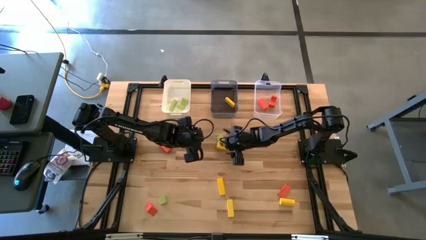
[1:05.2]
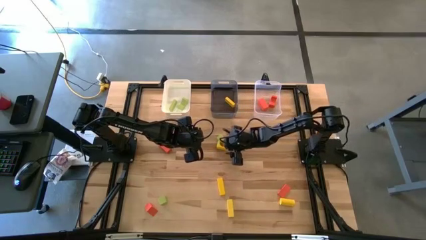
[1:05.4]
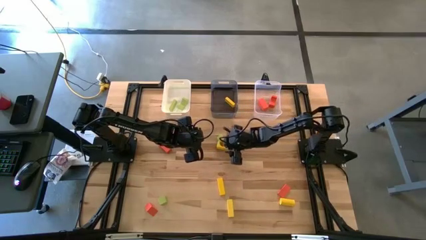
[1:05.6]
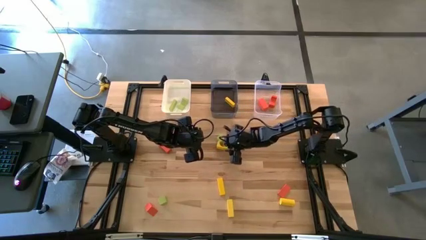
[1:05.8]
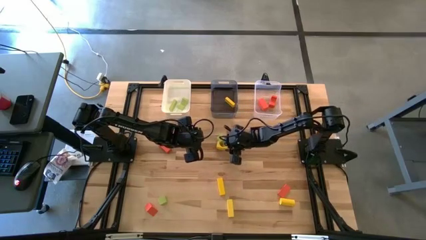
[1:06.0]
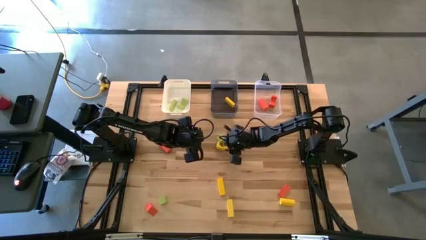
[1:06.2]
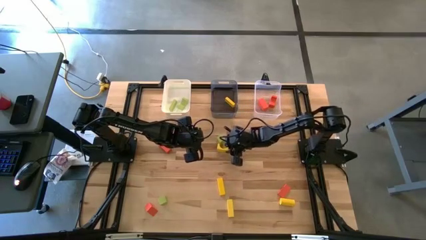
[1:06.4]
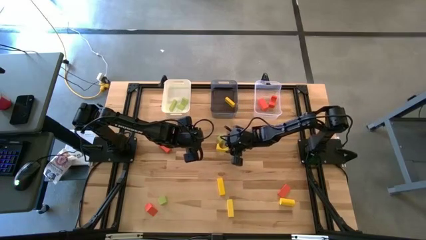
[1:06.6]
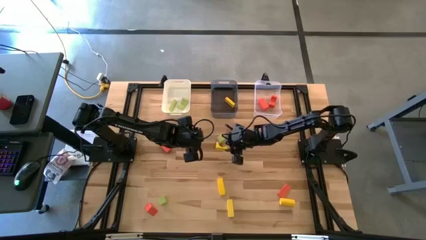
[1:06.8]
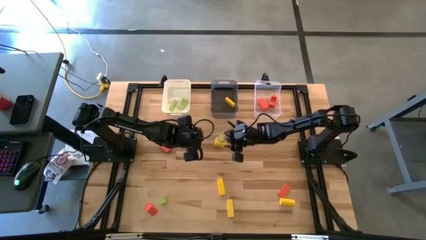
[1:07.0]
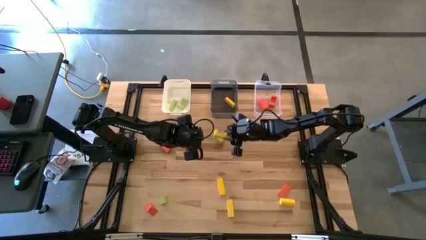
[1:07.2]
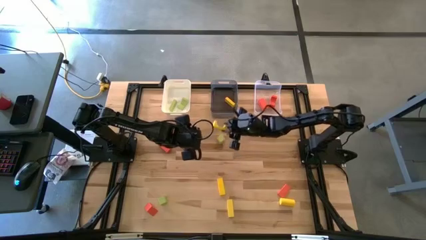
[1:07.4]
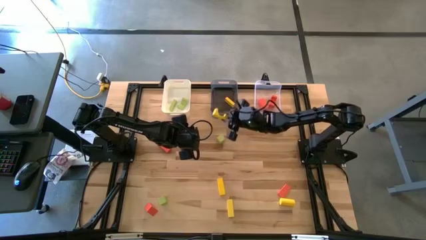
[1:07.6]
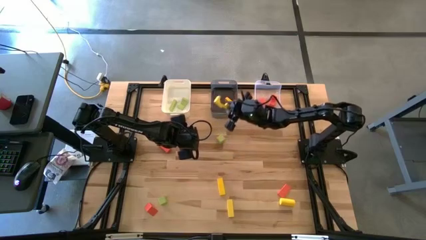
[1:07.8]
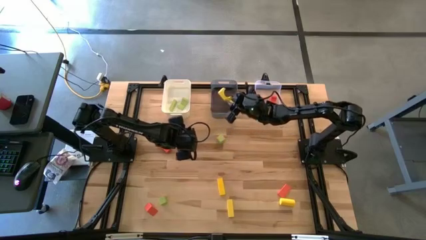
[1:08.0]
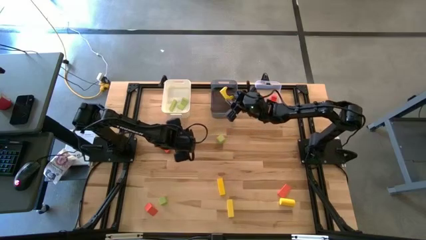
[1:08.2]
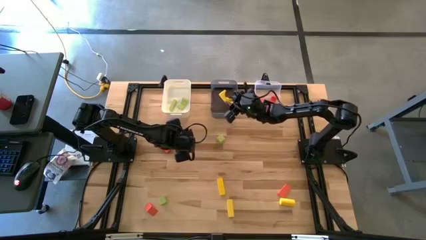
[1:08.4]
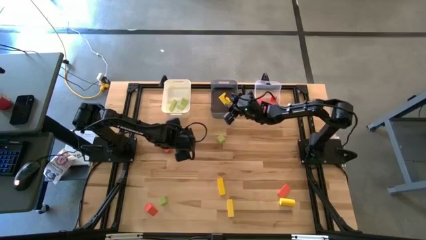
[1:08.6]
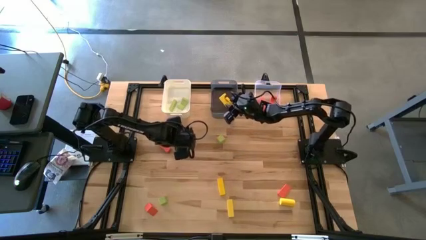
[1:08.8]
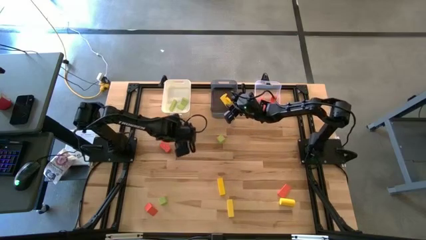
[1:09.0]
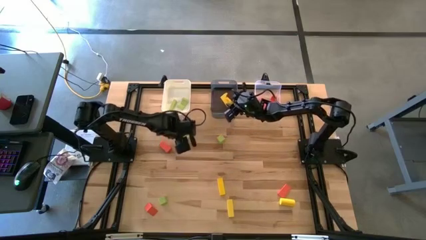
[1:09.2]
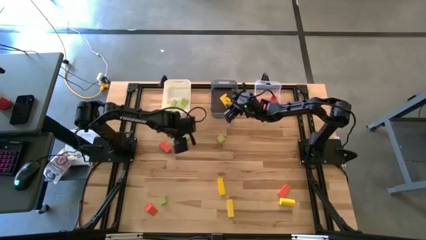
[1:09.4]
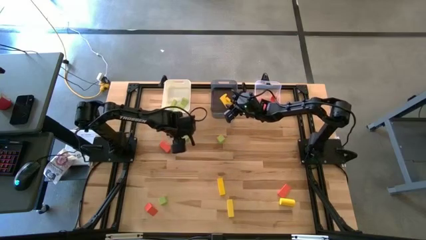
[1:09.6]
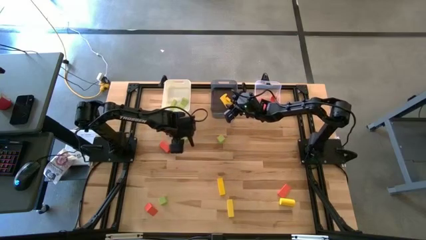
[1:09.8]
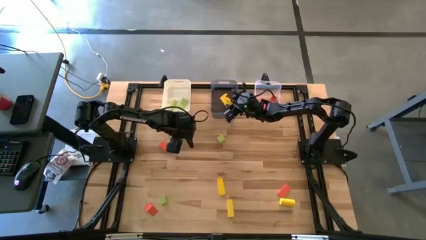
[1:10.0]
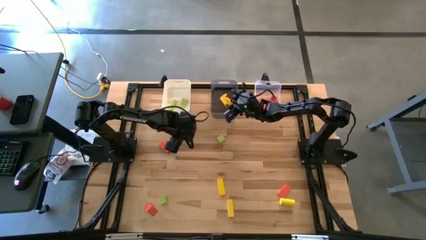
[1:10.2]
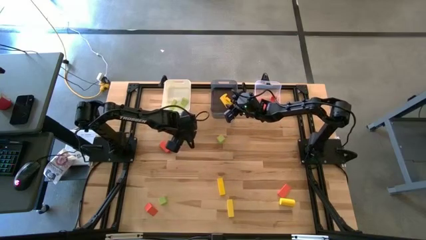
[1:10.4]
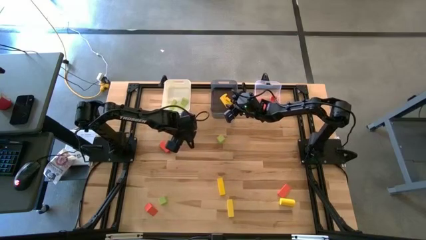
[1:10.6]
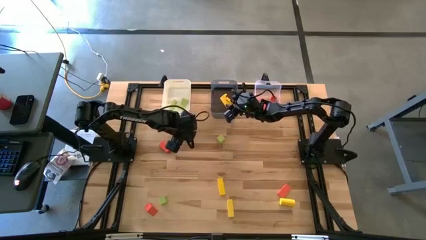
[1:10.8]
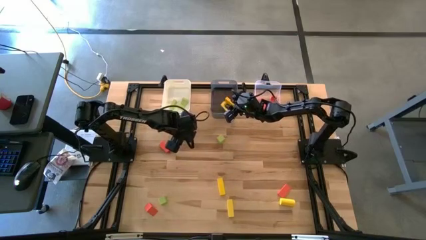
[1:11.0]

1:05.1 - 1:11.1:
Task: Sort & place blocks by color
Put the yellow block into the black bin

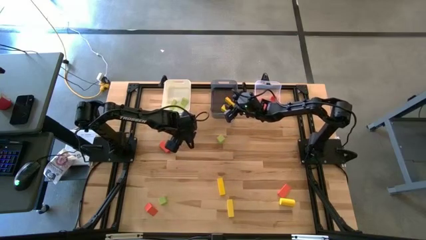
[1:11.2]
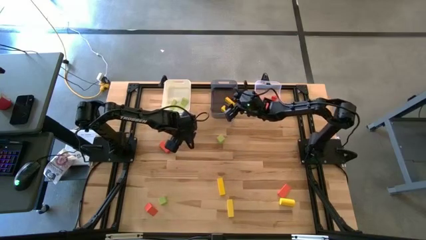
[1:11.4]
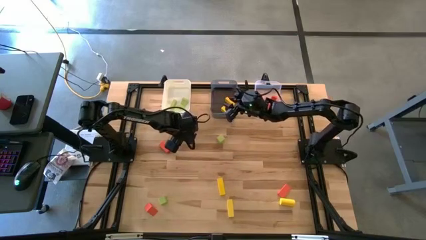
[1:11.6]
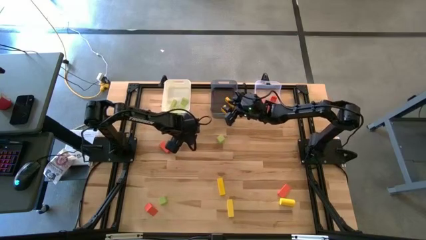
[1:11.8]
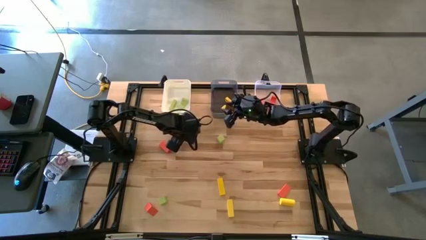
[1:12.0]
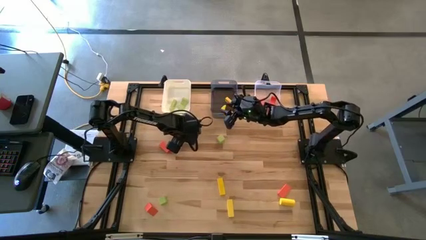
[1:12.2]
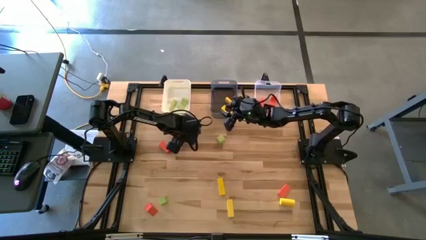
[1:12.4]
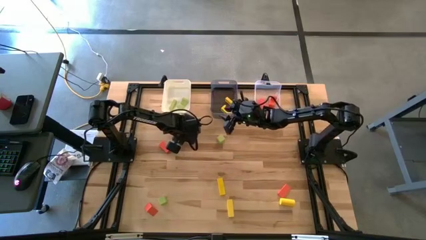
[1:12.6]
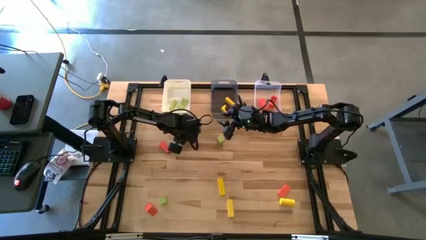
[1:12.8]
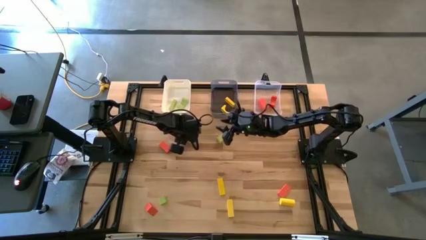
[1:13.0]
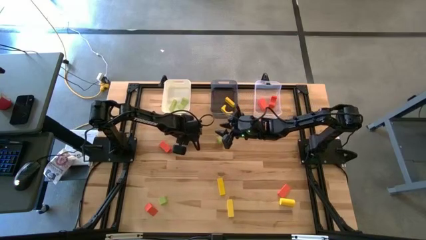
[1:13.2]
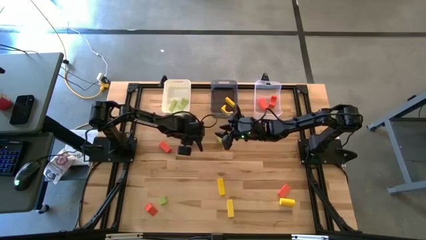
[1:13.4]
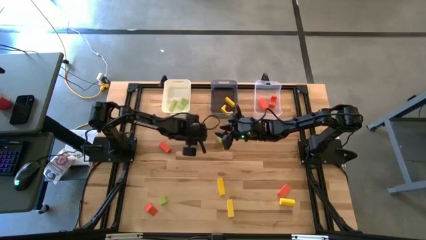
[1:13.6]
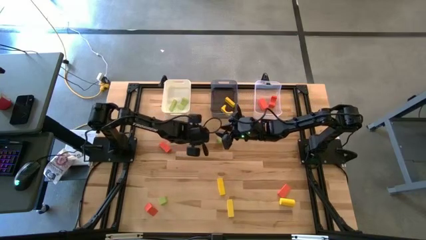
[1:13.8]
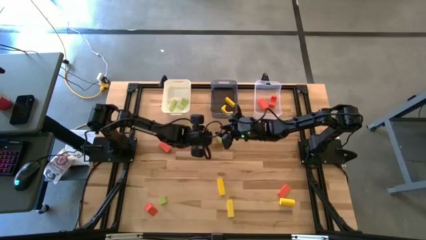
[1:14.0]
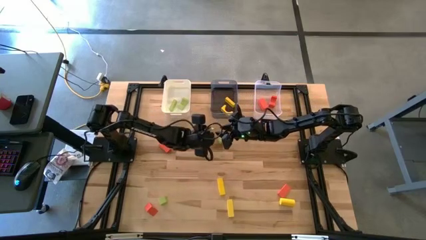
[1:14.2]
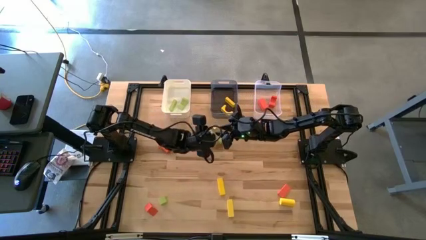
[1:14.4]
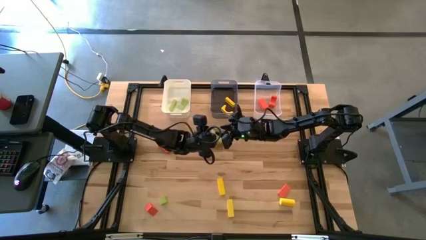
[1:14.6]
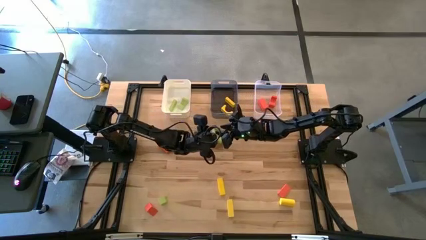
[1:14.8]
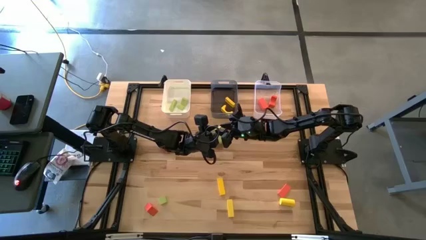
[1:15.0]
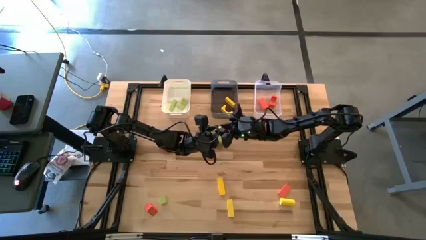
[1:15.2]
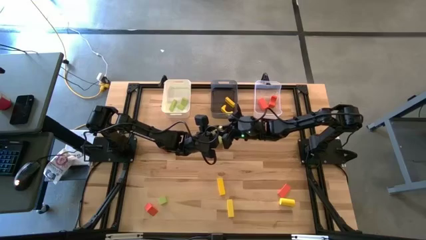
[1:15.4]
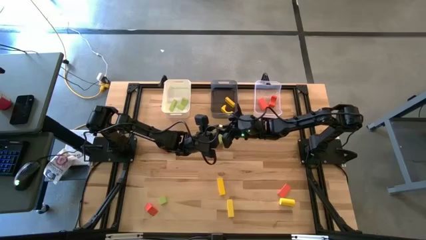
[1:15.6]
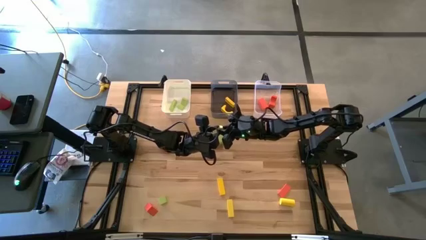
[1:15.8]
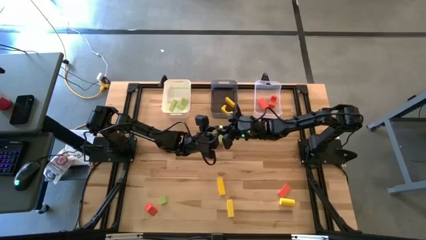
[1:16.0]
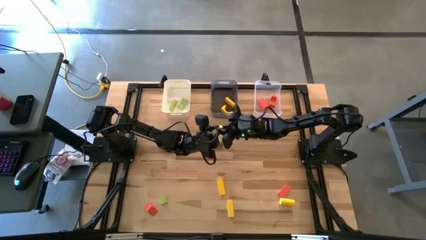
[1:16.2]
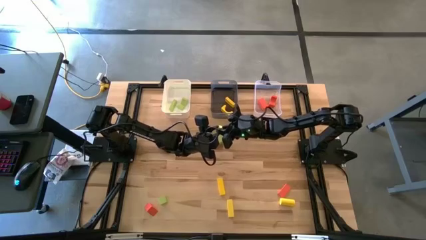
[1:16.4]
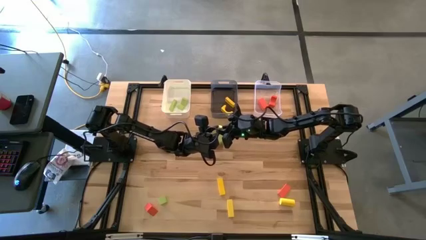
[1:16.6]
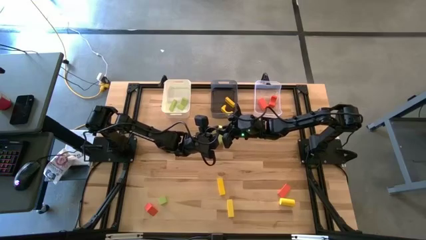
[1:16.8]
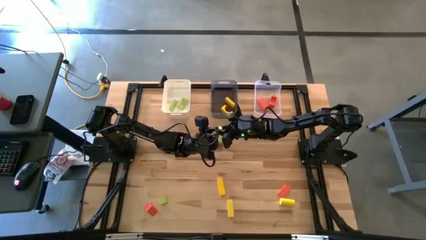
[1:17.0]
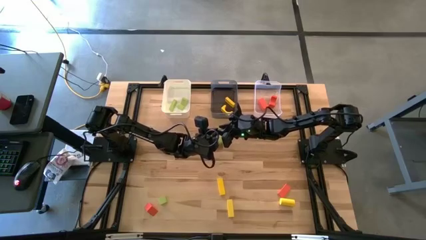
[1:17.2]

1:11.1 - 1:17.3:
Put the green block into the white bin

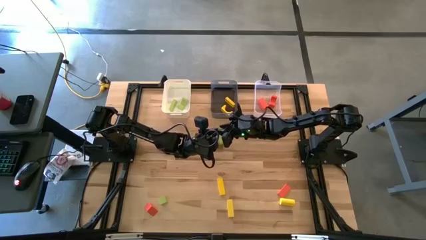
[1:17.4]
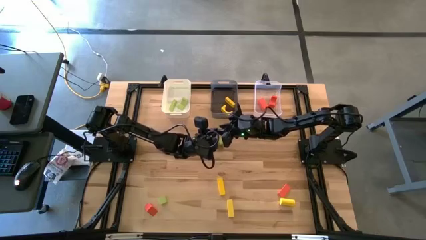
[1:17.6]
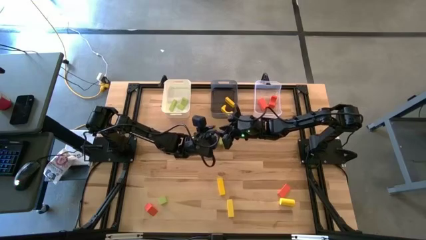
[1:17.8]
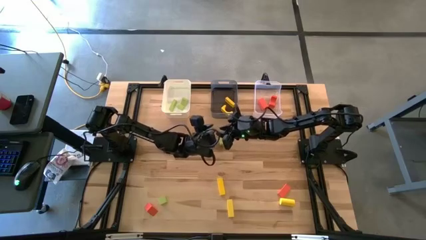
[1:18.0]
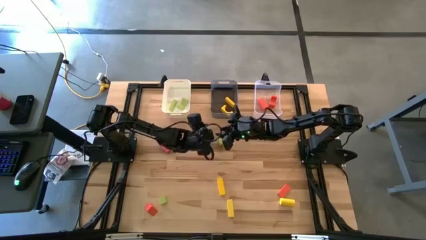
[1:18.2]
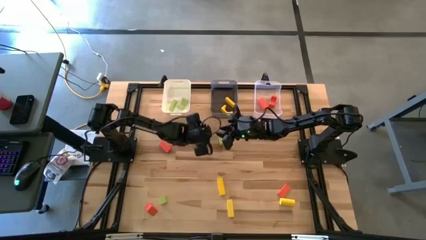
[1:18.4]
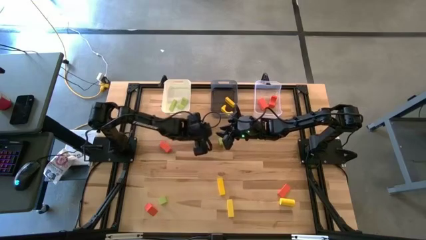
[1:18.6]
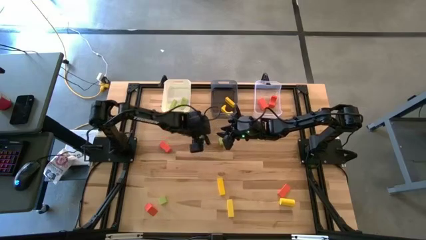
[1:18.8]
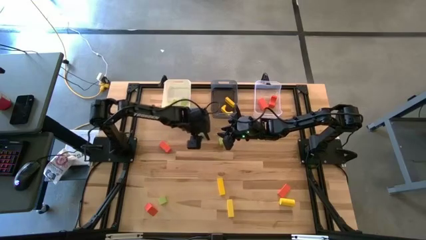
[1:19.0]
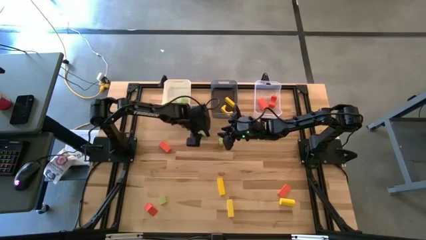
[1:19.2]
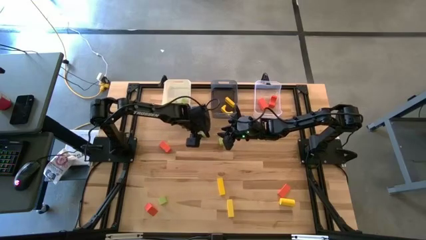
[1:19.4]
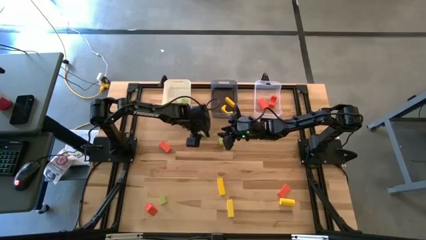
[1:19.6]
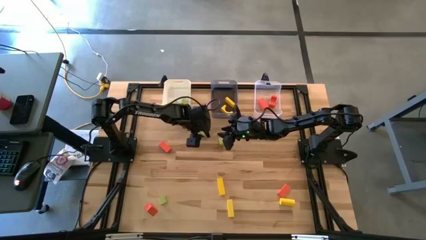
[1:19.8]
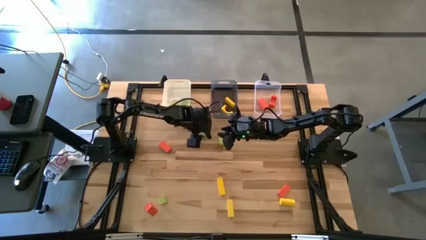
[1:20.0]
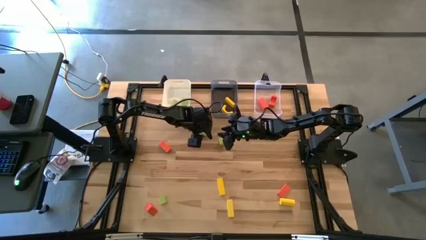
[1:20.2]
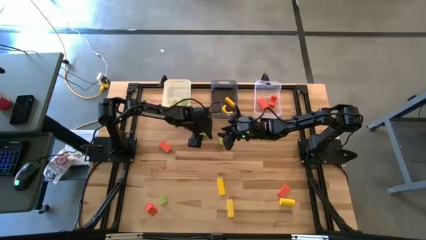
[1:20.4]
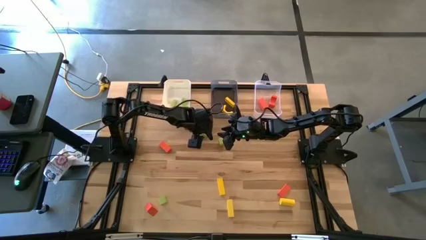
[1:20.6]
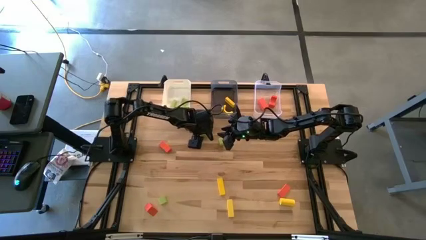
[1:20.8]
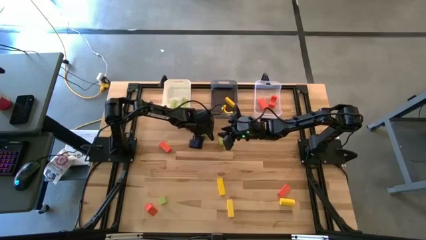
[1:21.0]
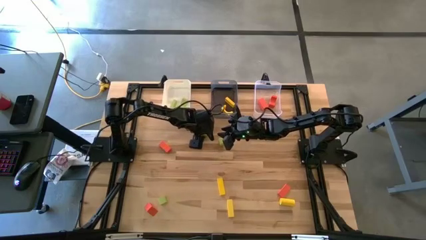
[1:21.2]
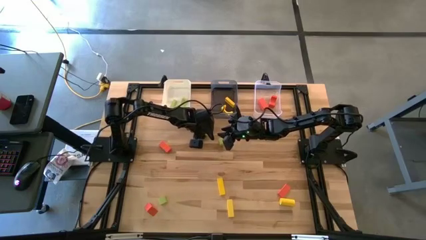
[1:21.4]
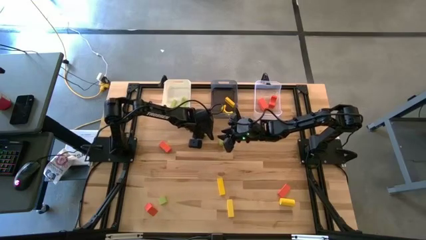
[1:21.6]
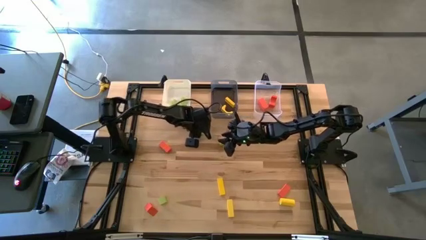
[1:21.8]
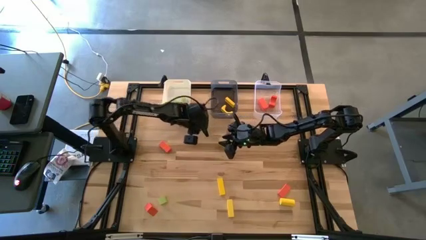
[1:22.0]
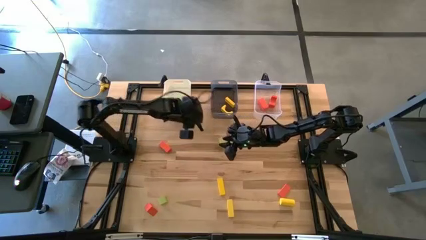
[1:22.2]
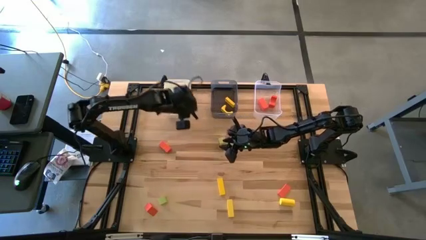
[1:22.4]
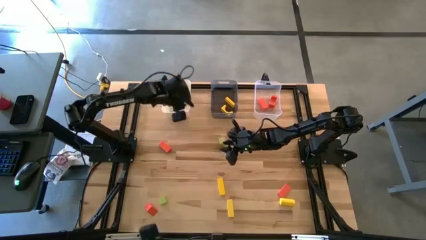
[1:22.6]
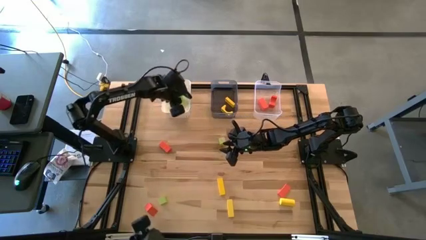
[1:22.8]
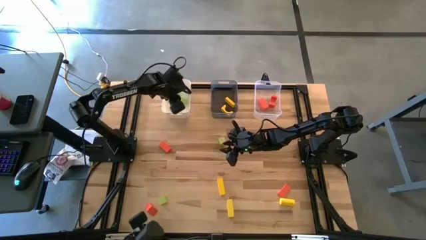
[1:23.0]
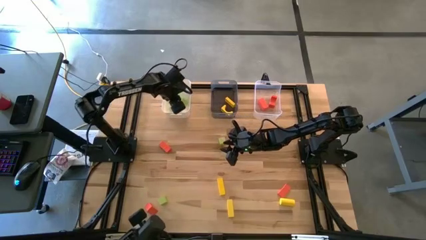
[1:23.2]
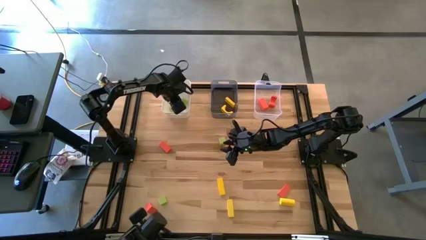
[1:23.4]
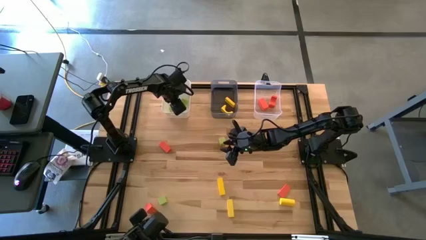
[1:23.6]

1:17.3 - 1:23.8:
Put the green block into the white bin
